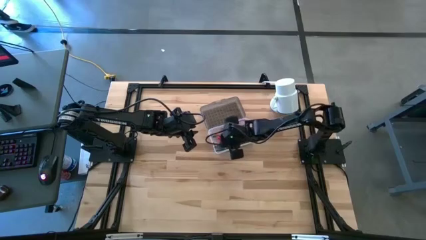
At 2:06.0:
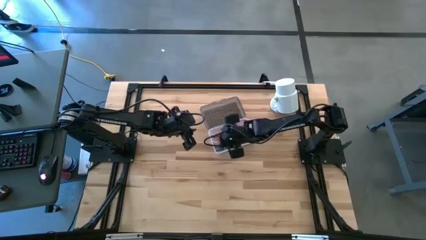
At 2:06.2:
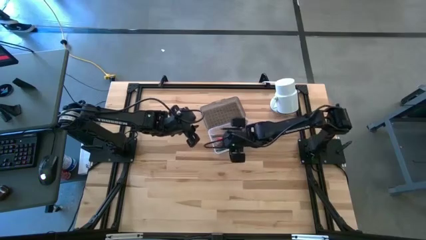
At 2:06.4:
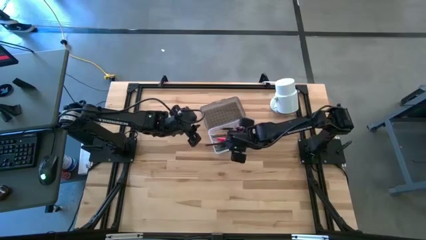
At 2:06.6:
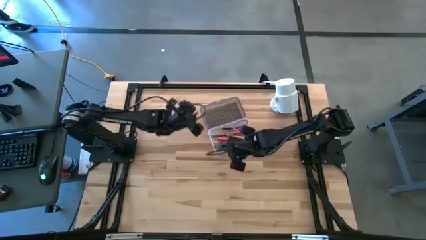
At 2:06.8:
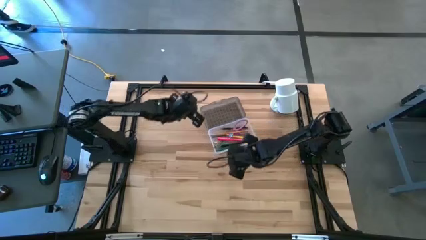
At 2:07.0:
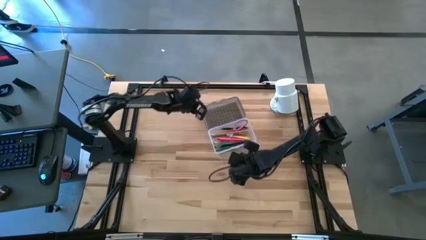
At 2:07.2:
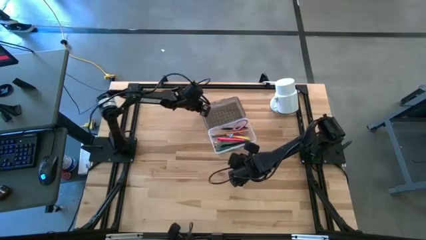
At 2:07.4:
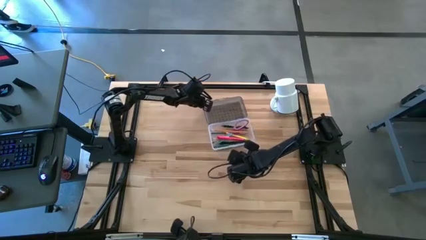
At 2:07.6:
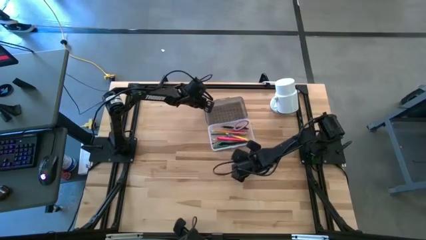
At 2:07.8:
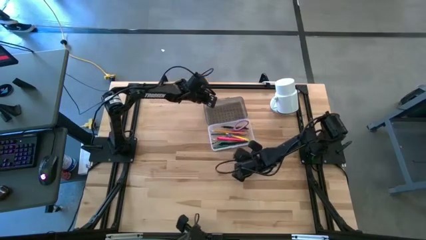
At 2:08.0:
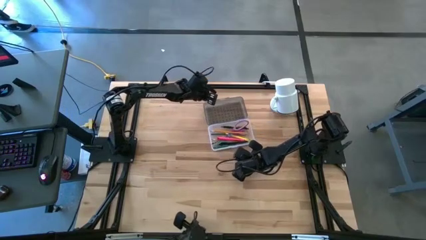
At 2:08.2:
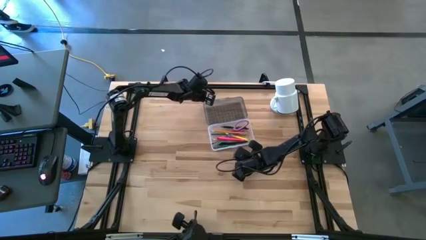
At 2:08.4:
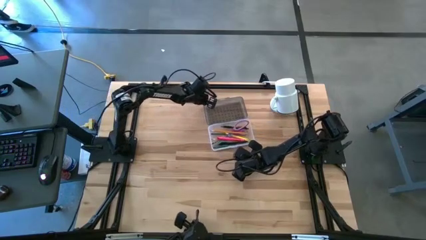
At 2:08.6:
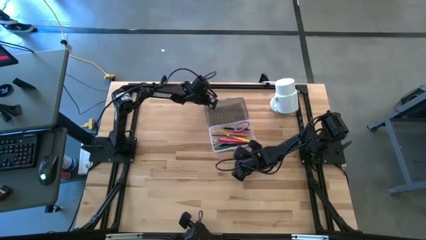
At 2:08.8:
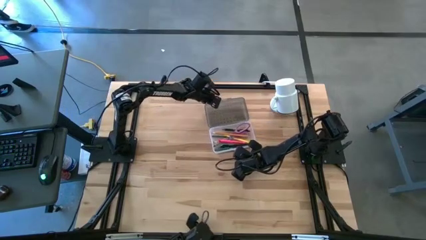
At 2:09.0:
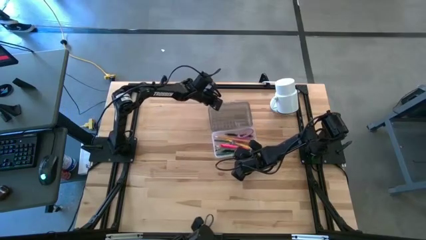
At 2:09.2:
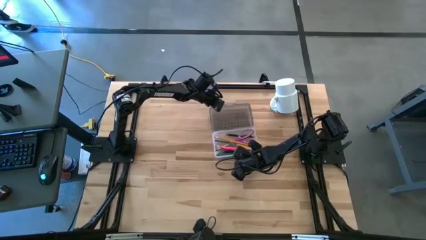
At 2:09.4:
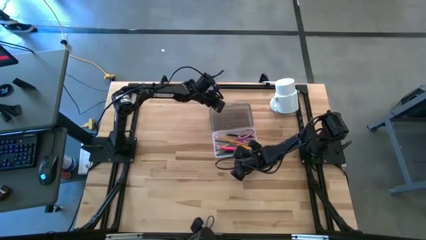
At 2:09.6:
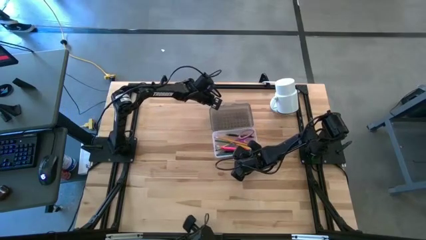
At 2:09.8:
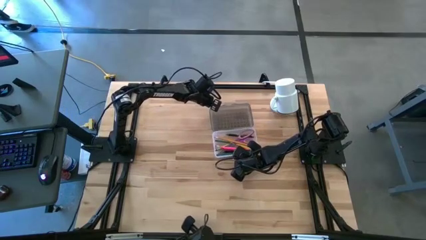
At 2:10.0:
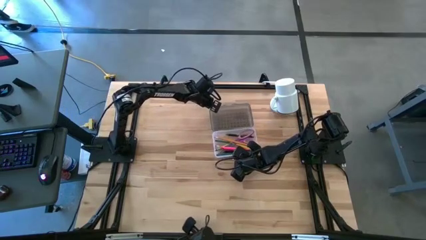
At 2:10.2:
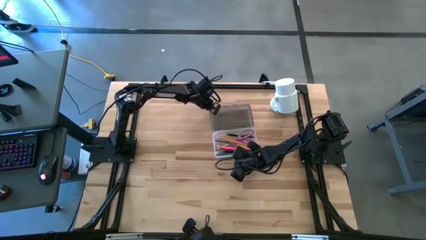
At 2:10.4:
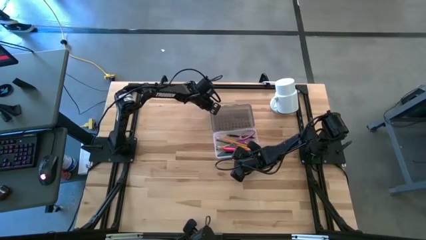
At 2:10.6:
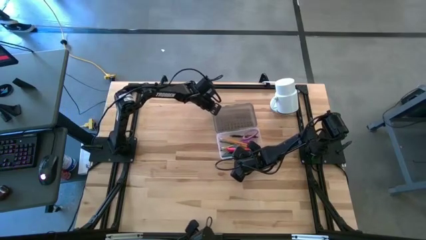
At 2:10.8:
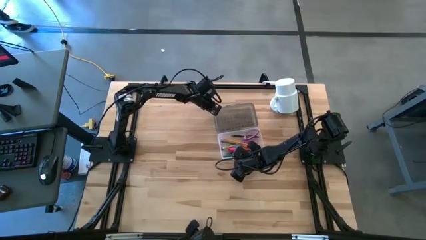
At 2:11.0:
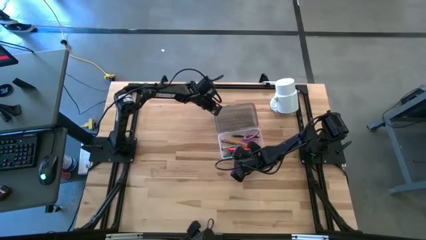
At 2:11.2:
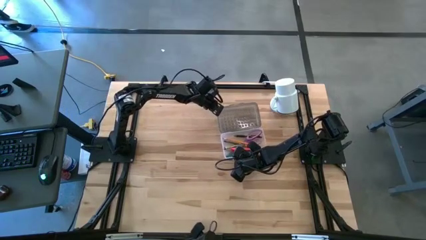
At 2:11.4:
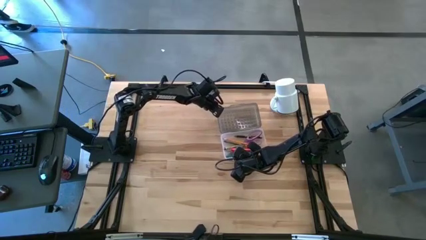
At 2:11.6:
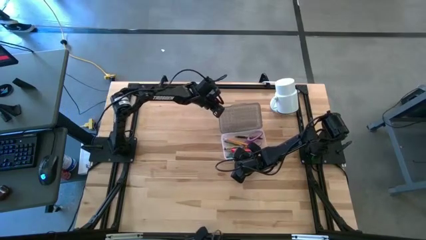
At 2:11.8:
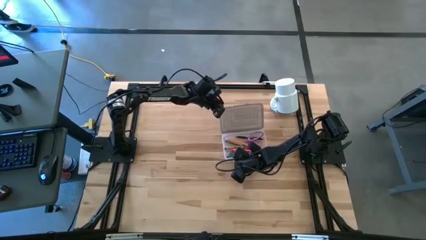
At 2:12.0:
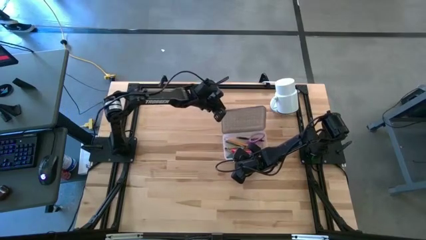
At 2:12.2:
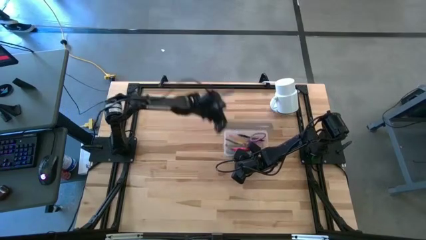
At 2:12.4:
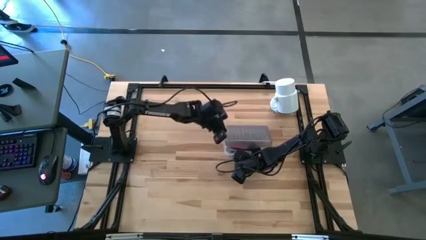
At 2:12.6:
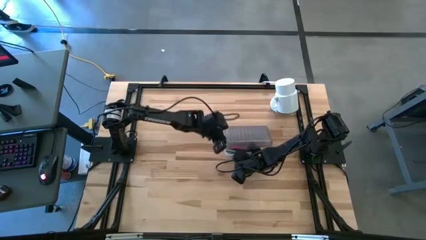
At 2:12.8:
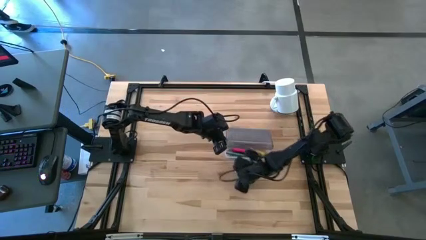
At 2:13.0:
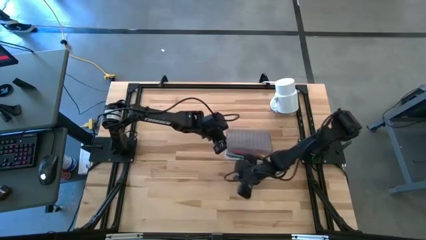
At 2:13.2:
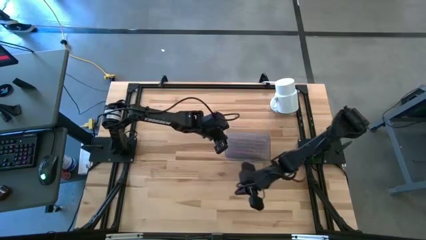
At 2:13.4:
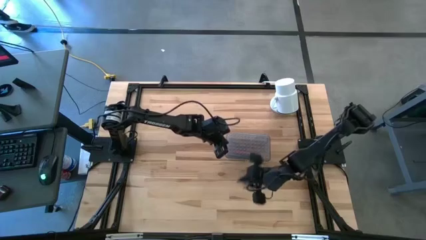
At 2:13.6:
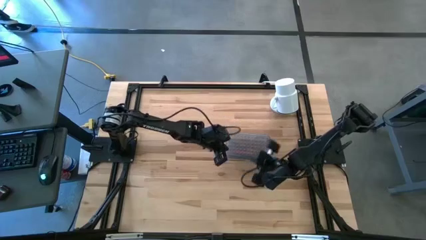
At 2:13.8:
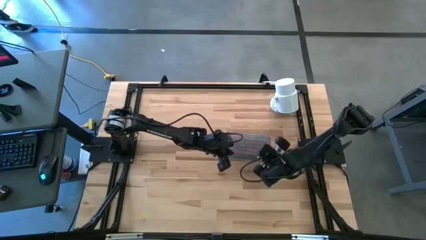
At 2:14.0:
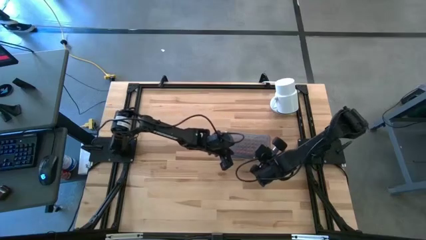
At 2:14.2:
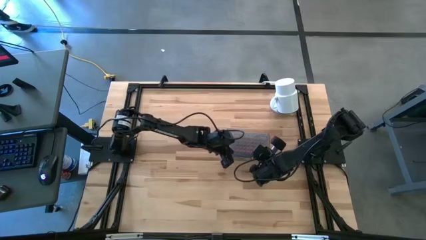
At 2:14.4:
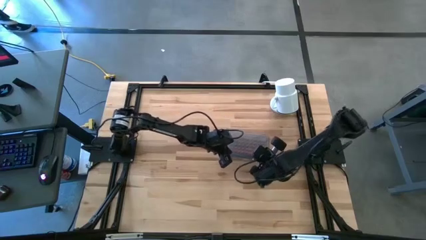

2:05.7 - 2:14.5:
Task: Pick & place school supplies into a supply box
Close the gray supply box

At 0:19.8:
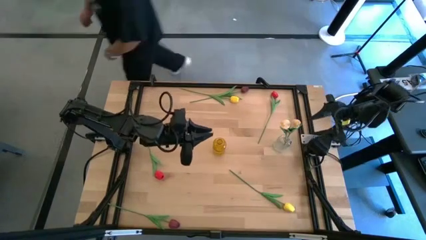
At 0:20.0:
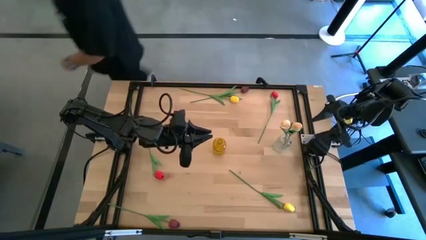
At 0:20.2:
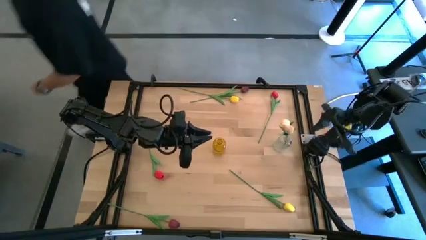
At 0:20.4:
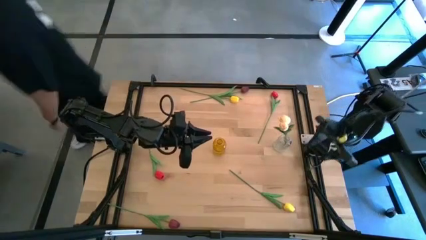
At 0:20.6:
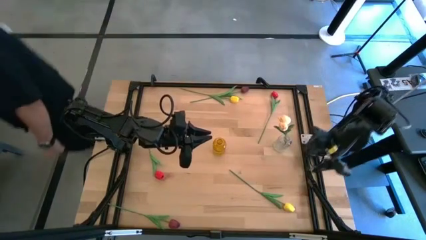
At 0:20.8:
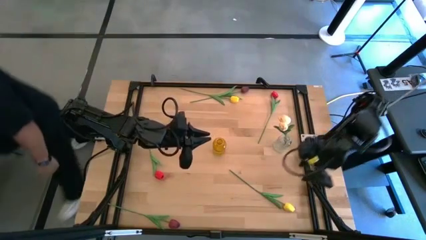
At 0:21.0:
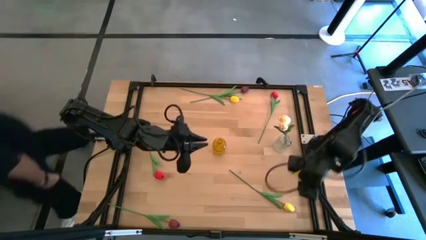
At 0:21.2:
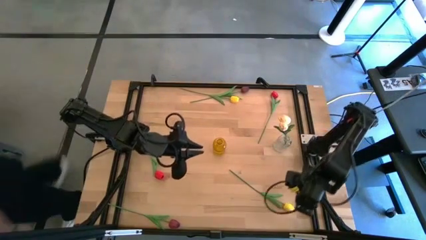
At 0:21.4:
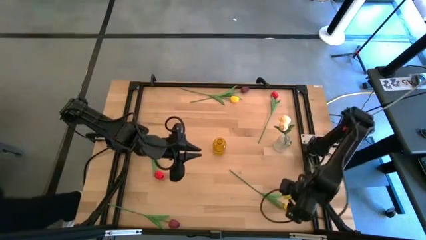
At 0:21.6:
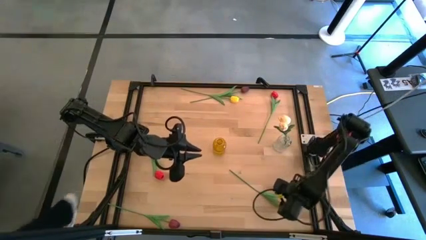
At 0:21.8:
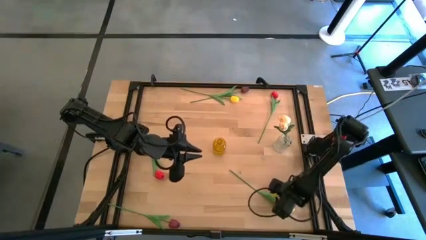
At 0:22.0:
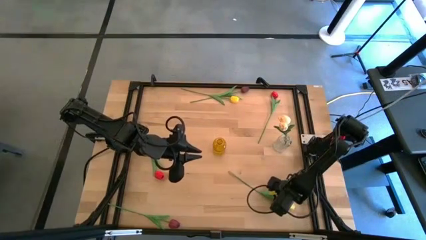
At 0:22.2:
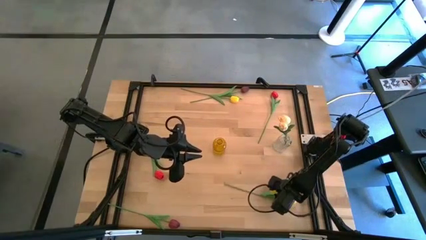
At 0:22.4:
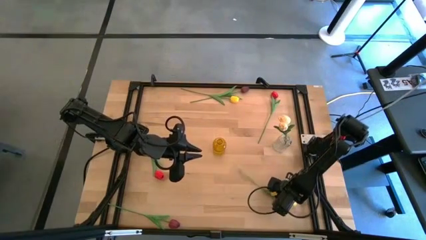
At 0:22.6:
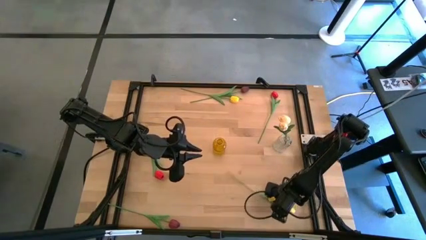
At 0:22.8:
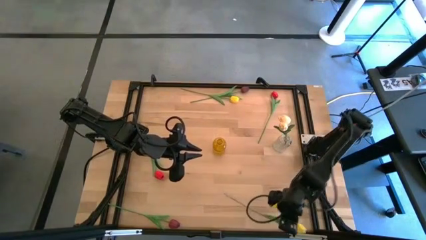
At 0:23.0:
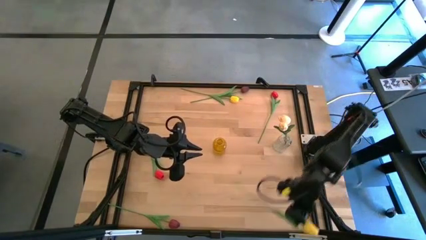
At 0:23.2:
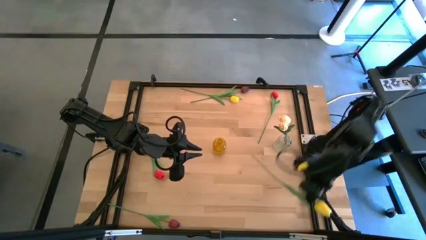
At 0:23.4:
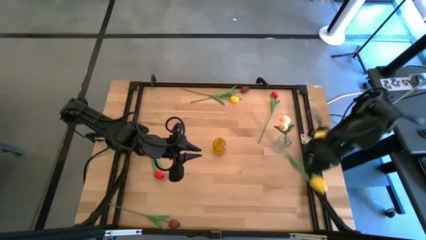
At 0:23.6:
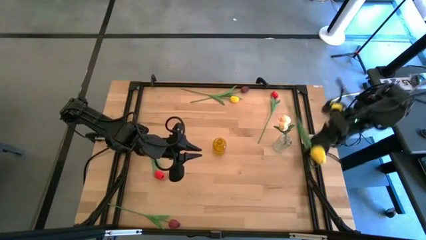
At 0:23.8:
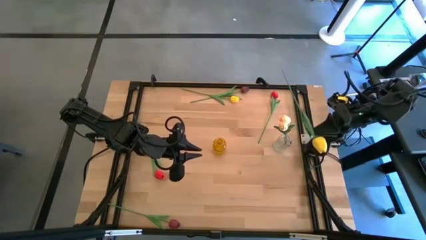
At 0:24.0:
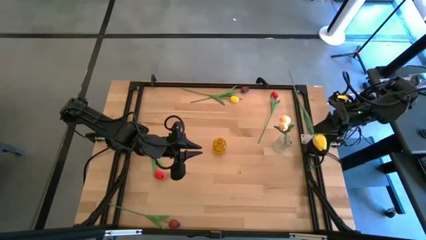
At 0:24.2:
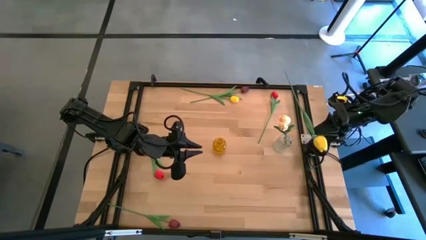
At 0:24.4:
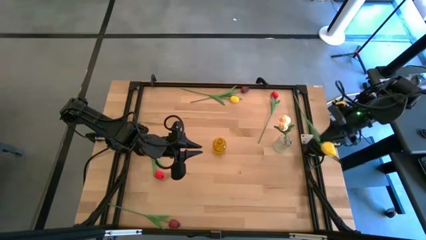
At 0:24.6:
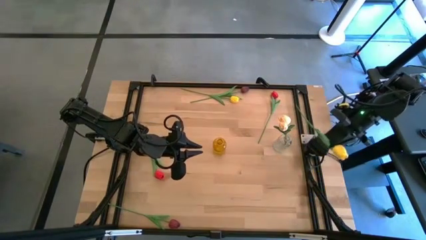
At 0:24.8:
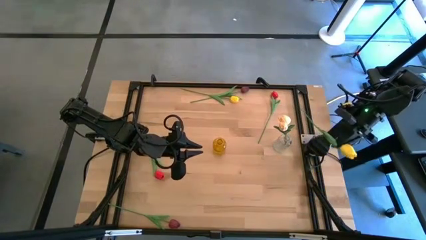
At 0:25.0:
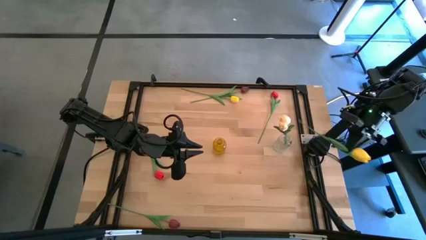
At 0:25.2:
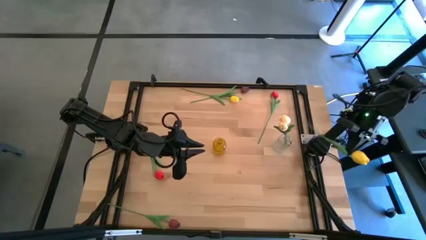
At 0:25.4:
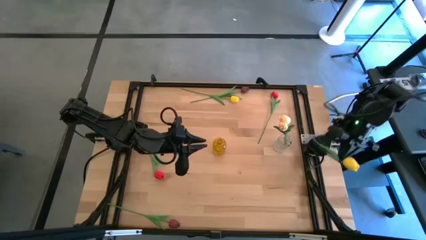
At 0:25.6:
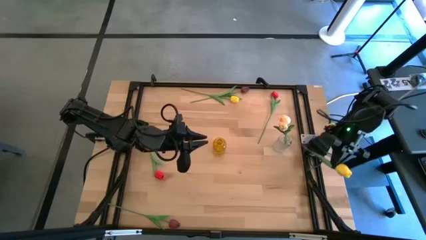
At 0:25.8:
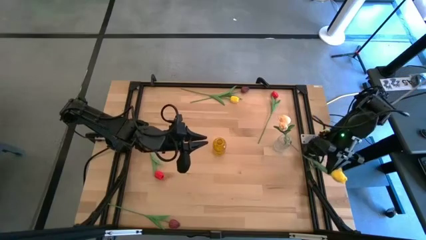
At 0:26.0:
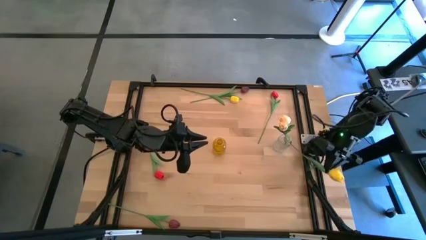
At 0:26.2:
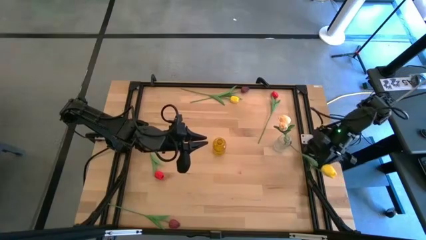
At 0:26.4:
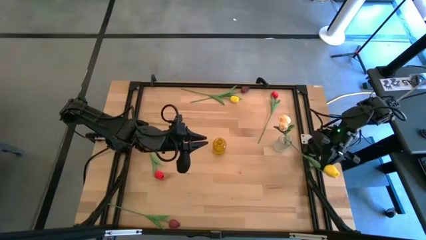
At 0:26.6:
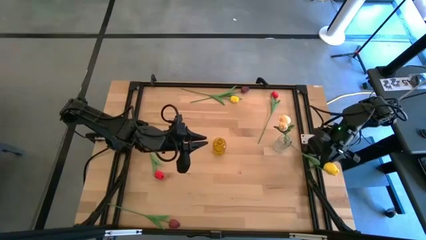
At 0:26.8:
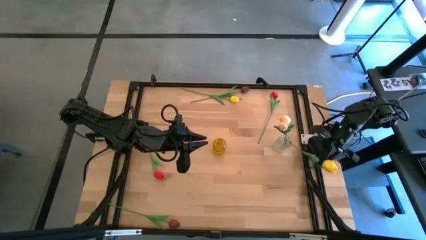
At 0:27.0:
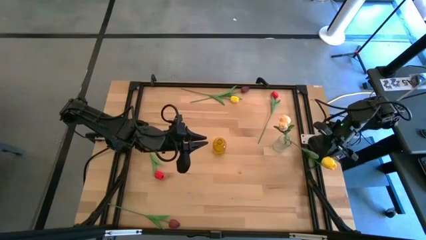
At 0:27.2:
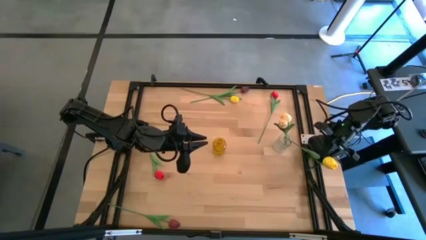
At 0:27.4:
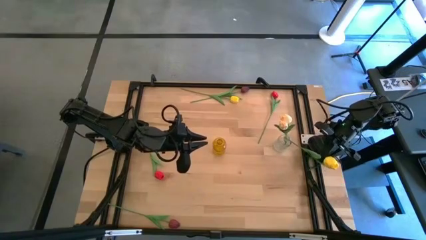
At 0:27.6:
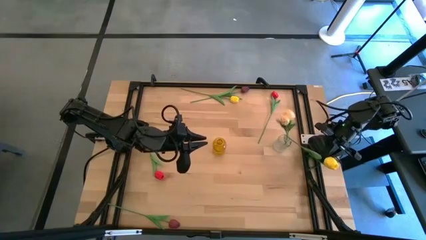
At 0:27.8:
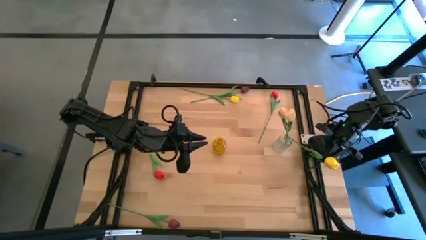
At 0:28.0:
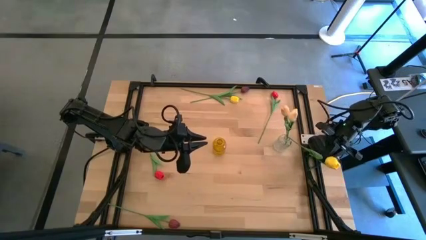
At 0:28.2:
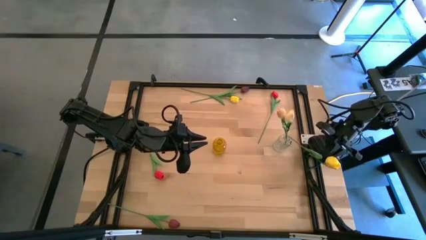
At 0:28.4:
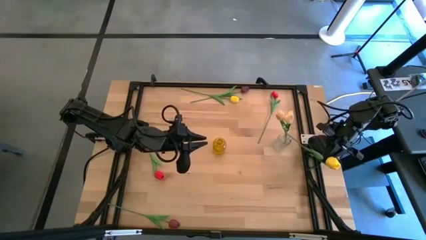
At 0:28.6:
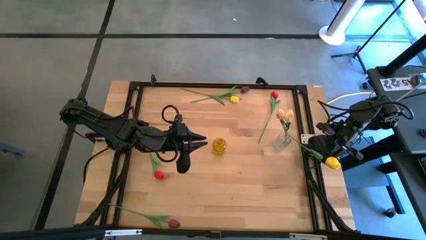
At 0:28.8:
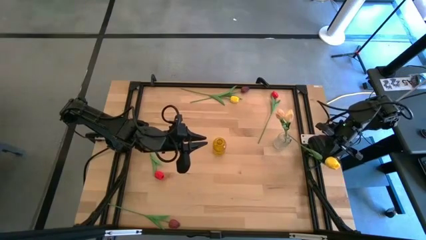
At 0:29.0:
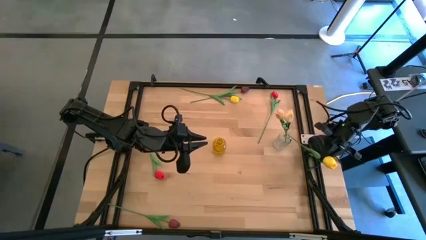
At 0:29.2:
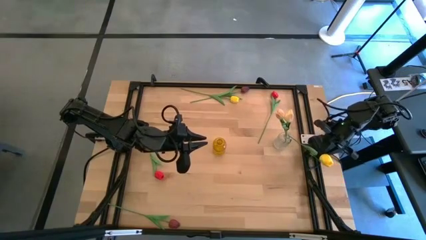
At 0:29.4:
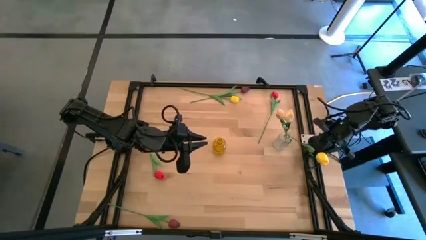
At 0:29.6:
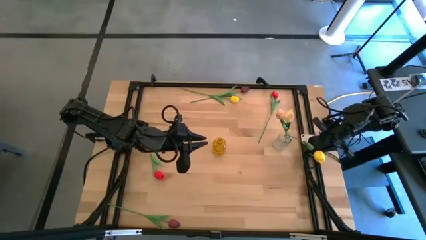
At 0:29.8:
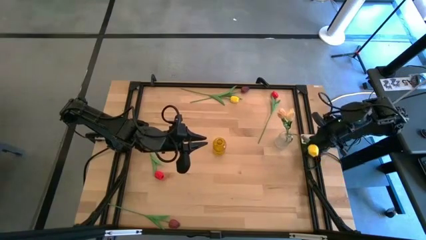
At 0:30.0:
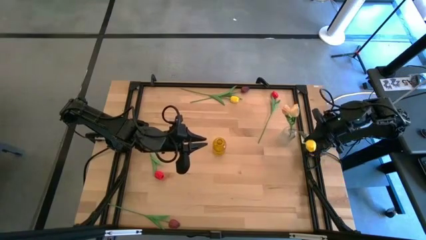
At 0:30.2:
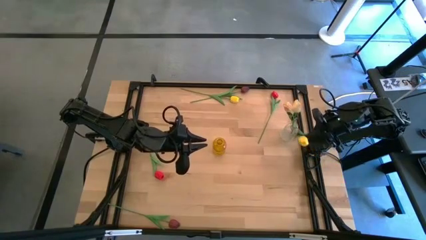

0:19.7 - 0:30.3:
Task: Sort flowers into vase by color
Put the bottom yellow tulip into the transparent vase
